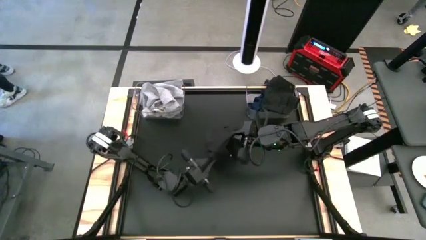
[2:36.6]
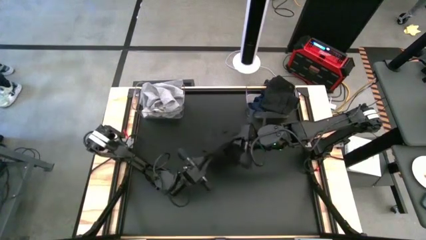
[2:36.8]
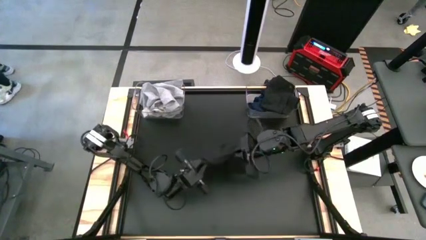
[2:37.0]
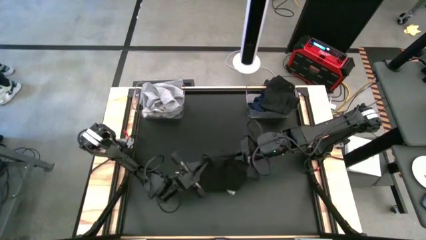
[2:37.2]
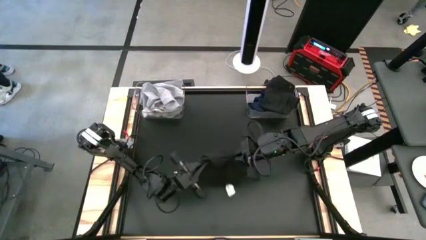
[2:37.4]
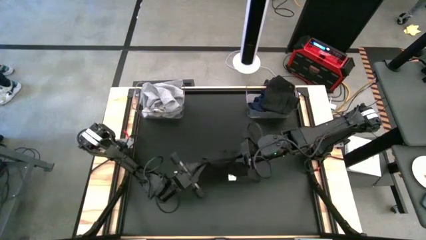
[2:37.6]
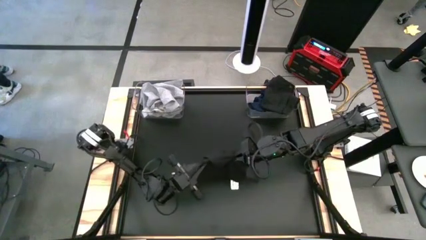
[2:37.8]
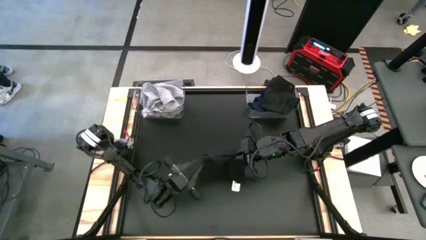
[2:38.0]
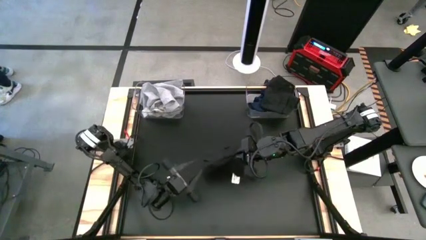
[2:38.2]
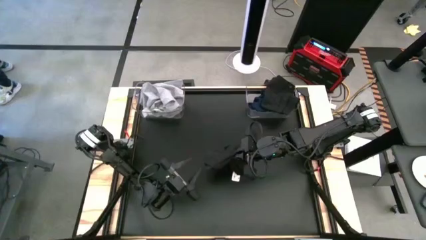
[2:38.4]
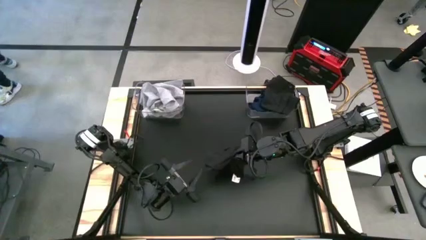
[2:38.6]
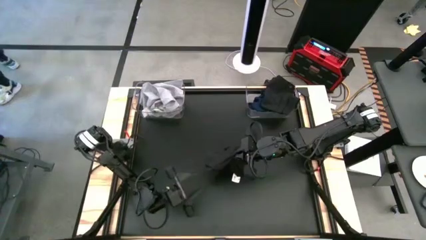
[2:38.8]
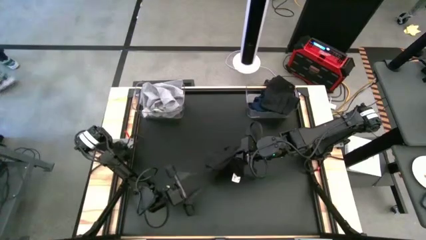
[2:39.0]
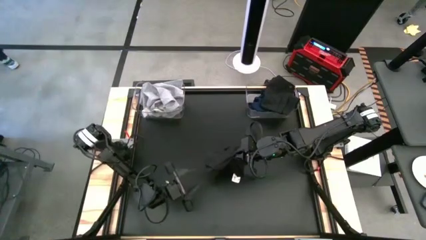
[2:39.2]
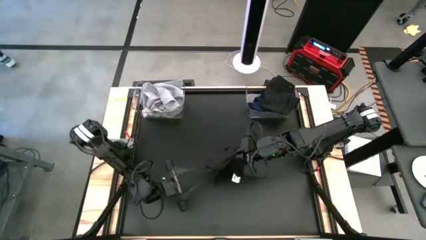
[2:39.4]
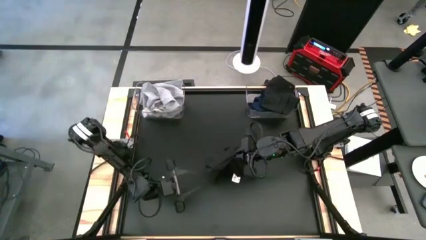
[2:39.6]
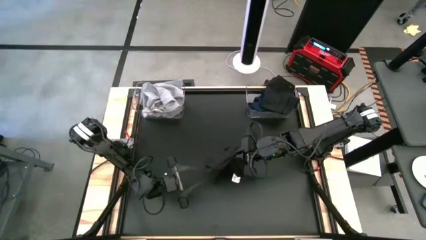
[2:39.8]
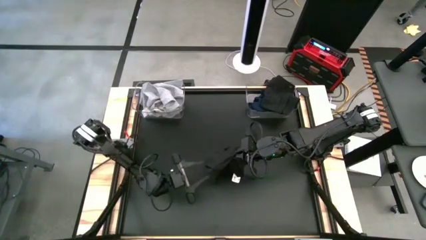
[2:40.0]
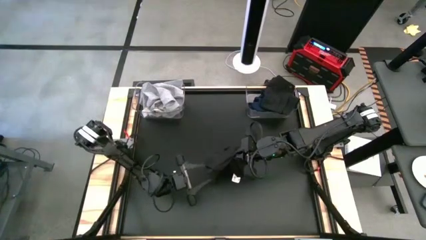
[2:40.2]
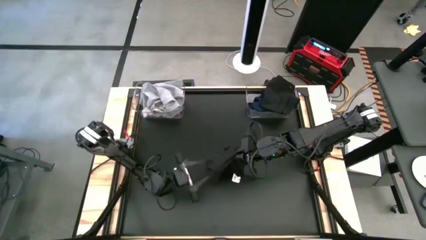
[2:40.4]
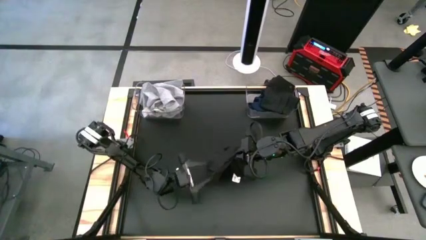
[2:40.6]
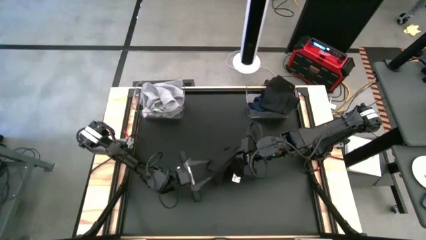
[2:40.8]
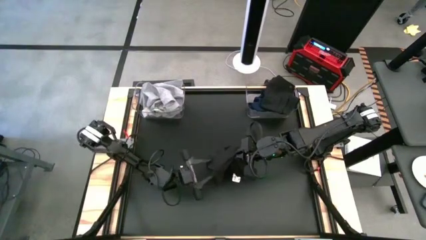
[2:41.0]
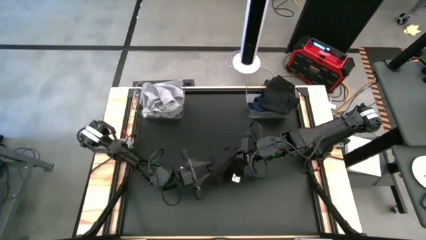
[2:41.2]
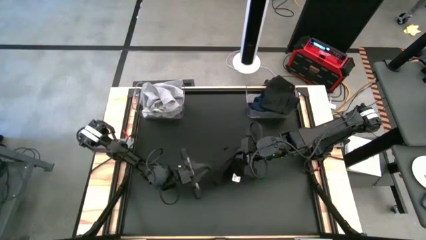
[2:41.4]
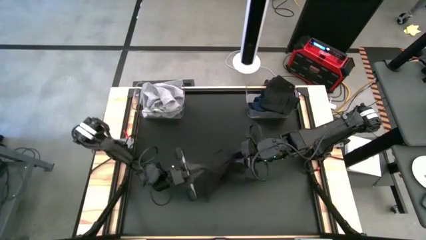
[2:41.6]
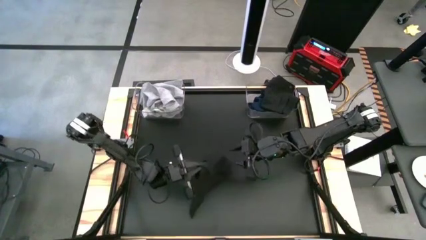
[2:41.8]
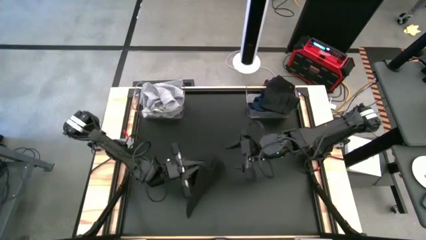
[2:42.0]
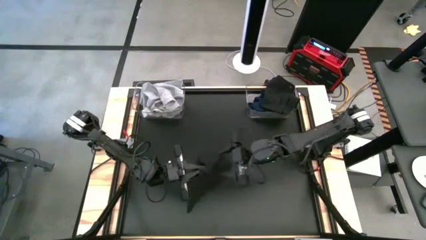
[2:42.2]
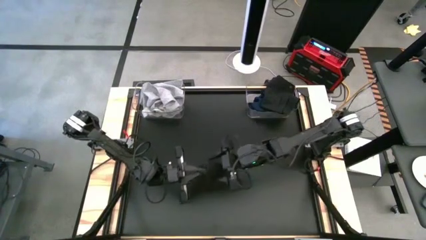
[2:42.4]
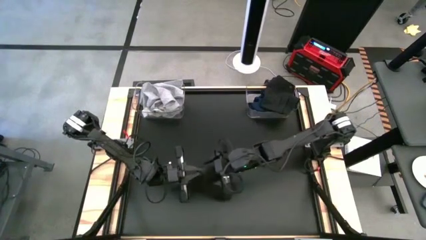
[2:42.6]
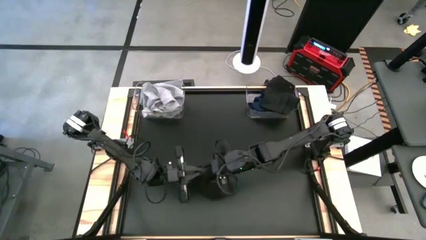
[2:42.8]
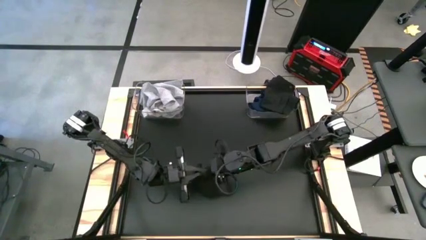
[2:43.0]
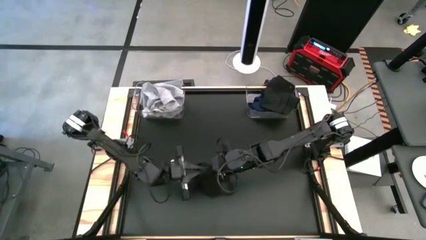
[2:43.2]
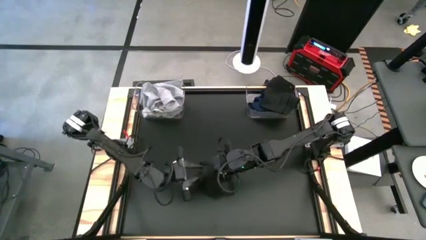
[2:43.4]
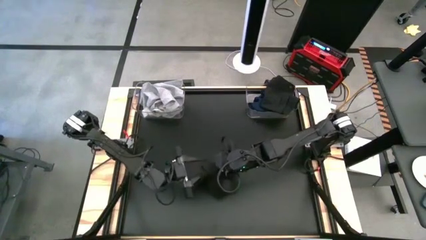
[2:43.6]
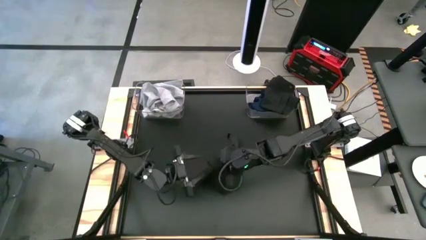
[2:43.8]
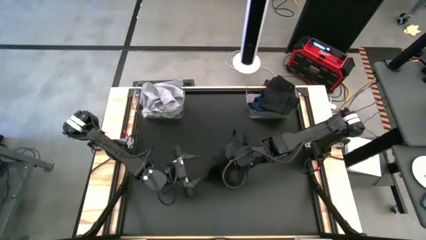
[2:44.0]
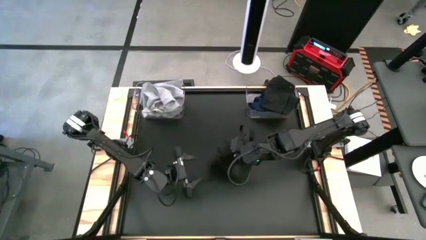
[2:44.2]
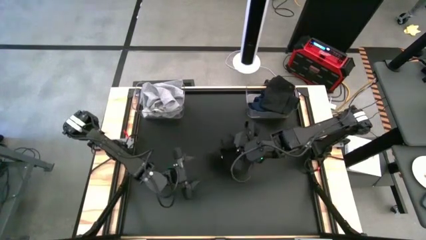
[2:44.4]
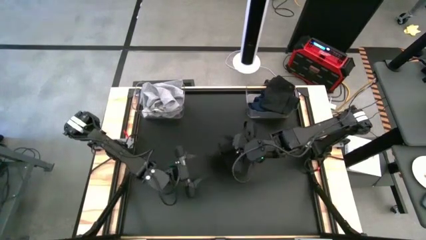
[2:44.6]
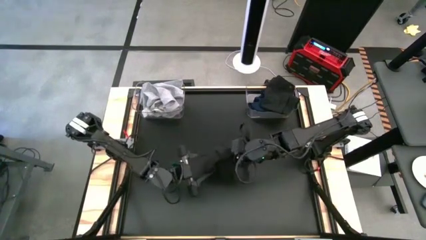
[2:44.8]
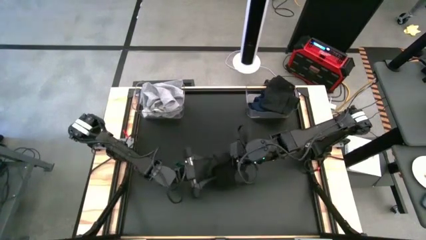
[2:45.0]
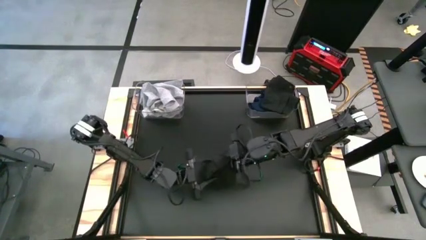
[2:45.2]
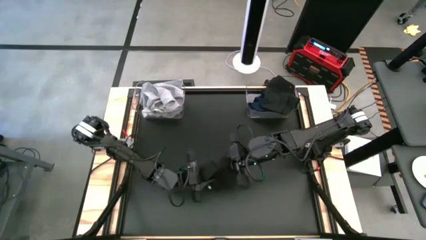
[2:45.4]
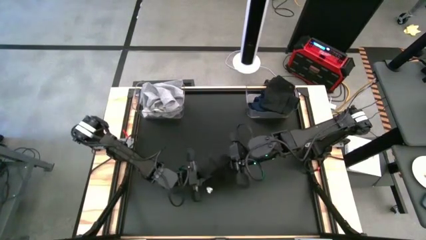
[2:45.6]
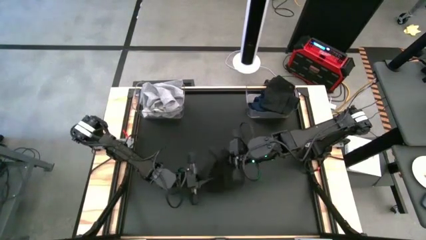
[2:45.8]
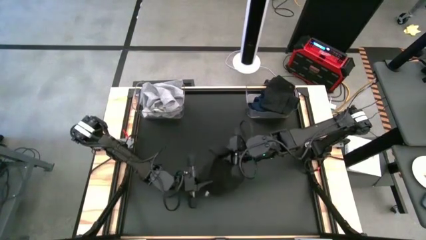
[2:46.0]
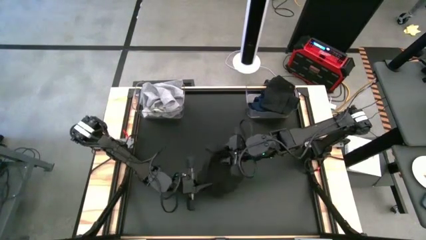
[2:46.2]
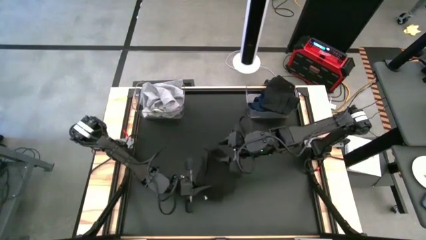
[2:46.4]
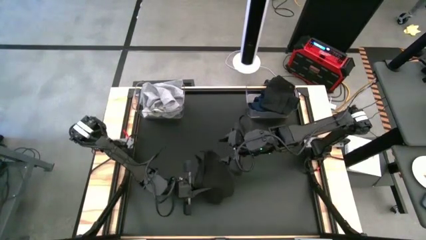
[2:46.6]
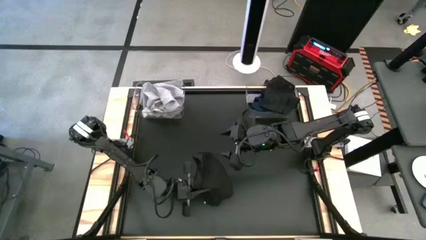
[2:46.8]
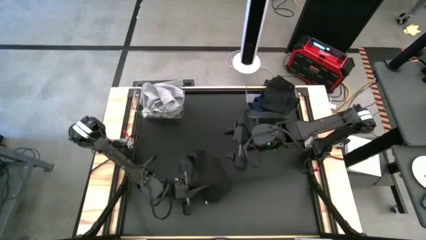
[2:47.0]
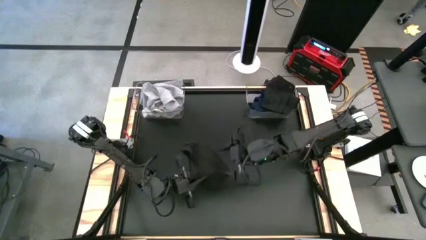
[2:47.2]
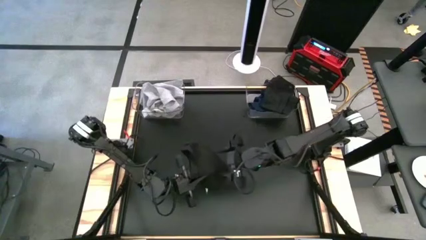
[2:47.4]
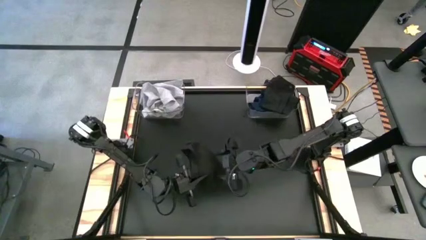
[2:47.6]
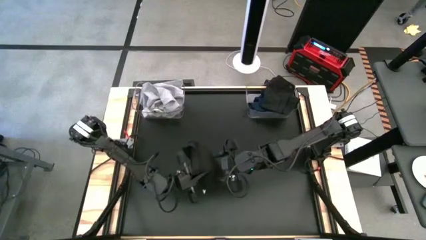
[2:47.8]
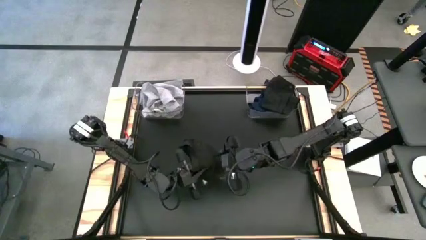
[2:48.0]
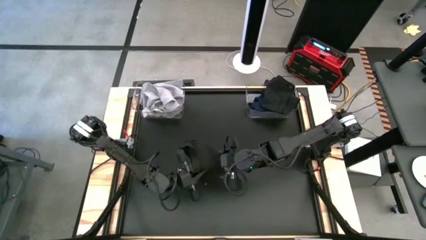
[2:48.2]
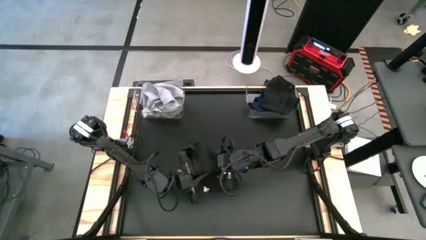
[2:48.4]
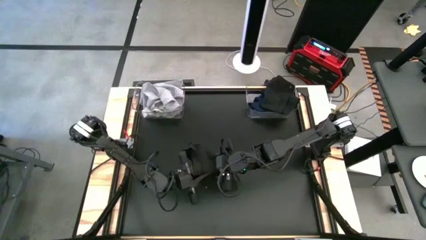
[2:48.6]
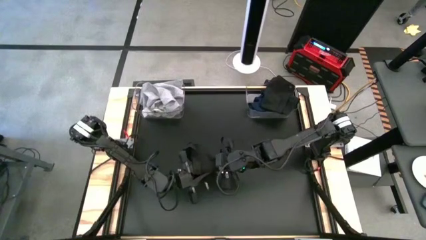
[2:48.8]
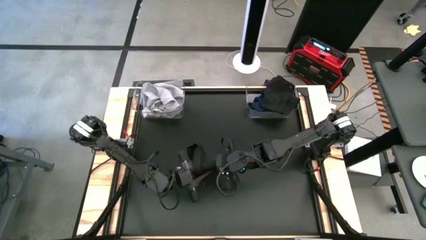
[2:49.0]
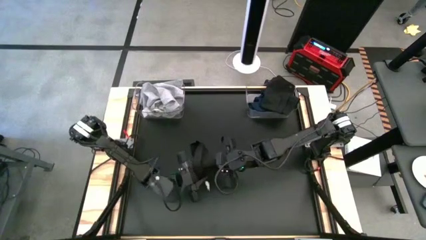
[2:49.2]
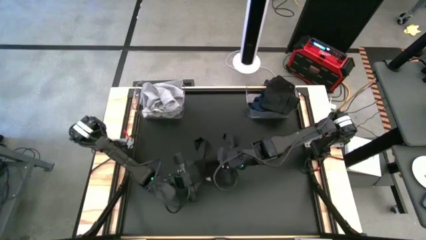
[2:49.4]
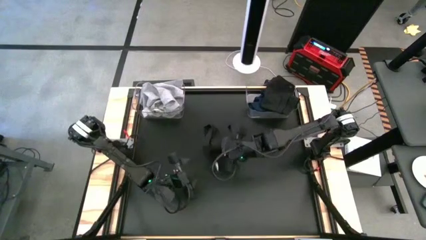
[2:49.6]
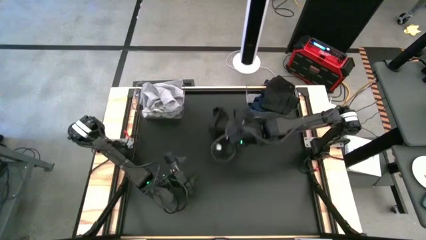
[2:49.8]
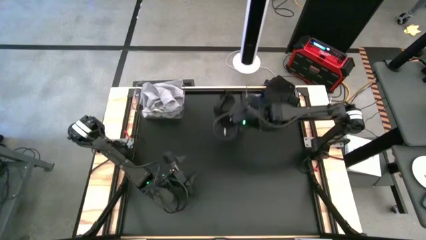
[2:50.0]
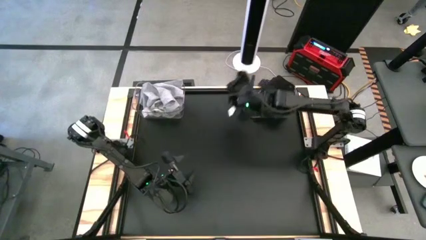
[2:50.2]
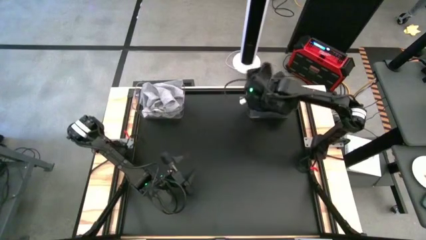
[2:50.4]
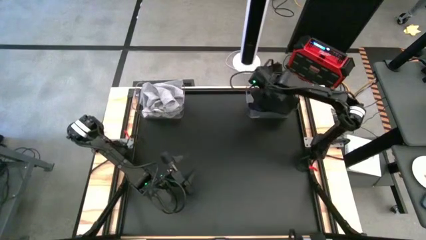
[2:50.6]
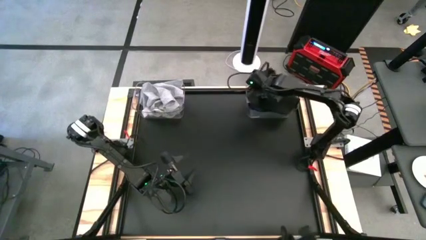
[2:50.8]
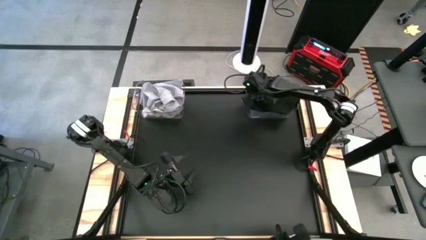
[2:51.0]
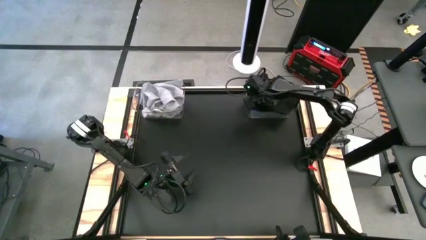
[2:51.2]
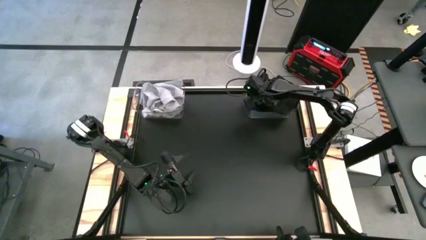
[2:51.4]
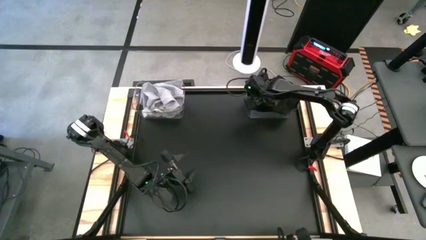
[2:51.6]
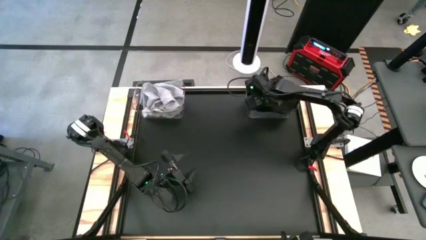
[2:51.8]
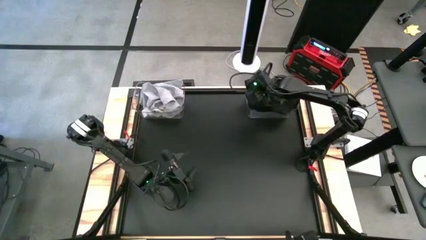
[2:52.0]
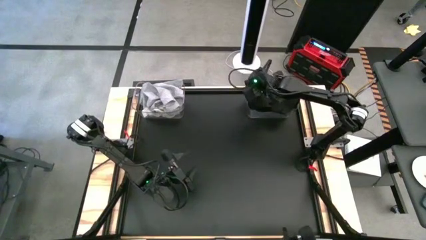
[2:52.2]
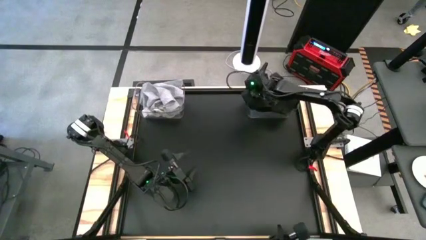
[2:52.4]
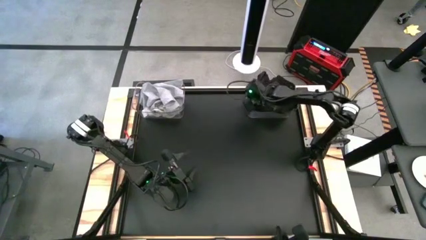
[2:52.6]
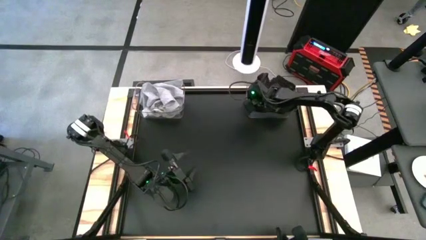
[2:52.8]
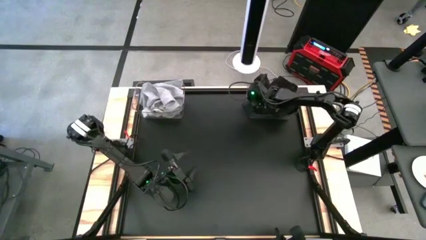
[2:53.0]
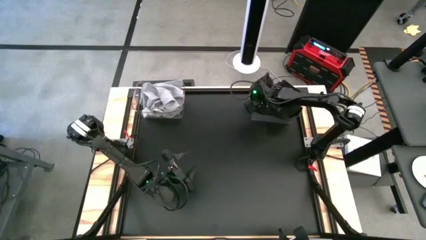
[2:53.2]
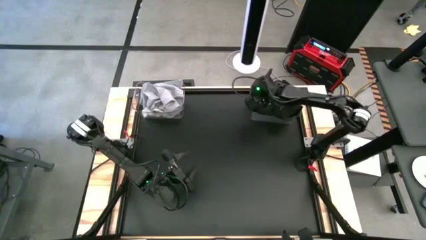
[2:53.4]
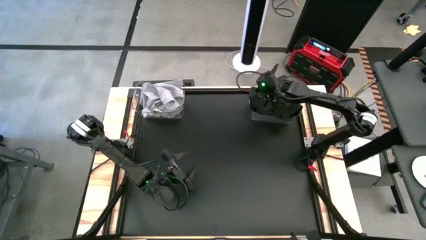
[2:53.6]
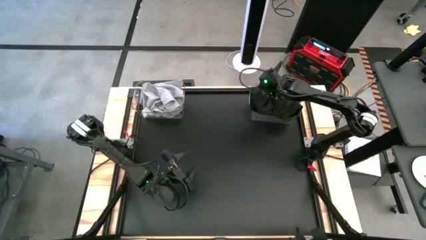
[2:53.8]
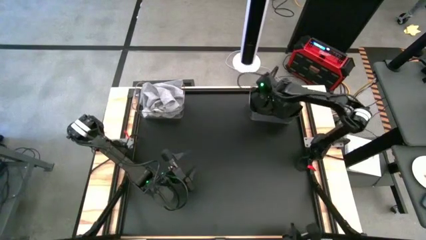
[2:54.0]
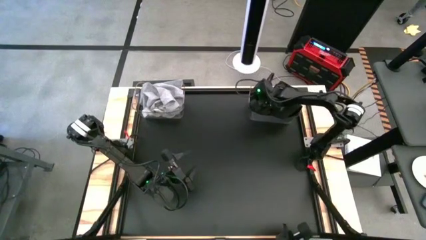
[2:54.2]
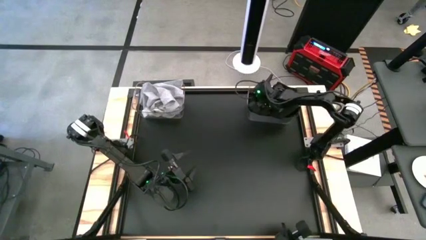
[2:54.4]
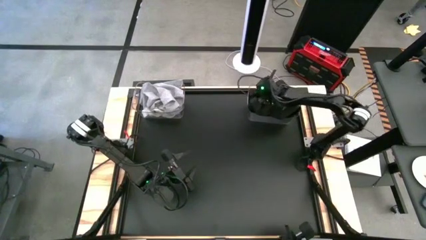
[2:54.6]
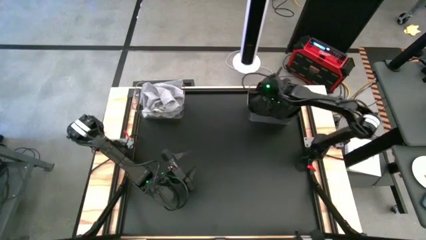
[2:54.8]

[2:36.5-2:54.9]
Task: Sort towels by color in basket
Put the black towel into the right transparent bin
